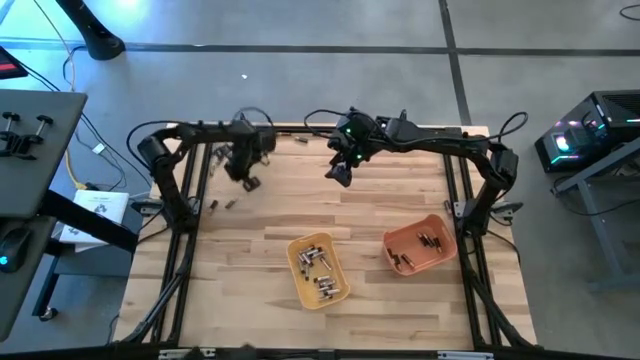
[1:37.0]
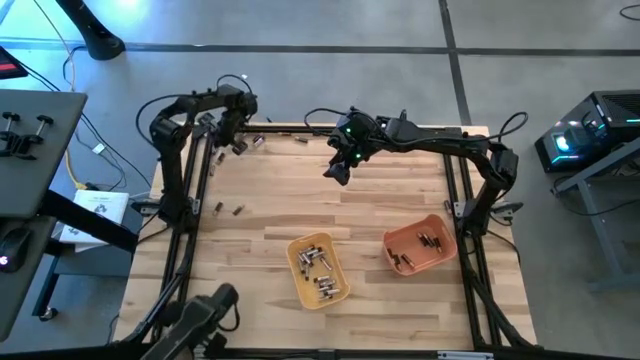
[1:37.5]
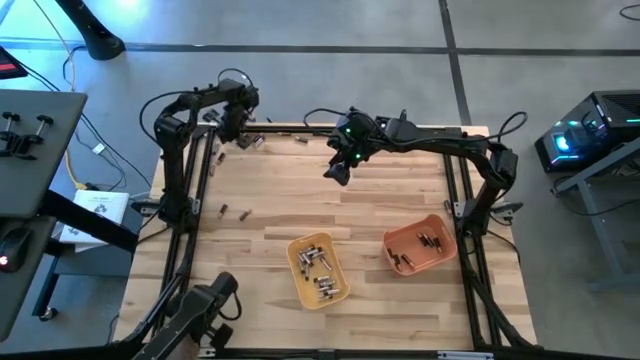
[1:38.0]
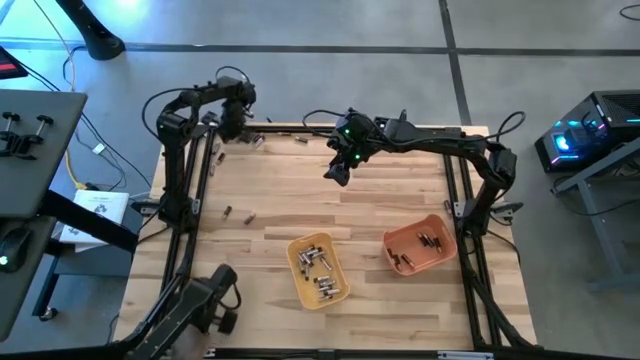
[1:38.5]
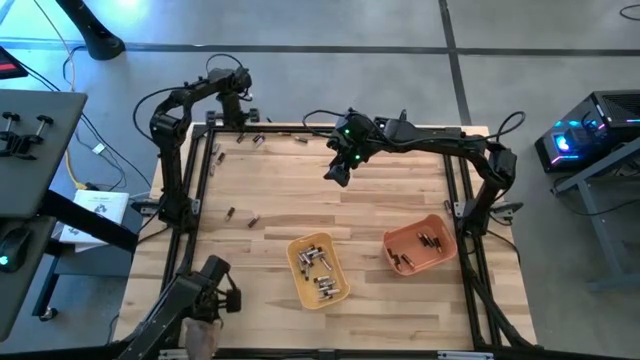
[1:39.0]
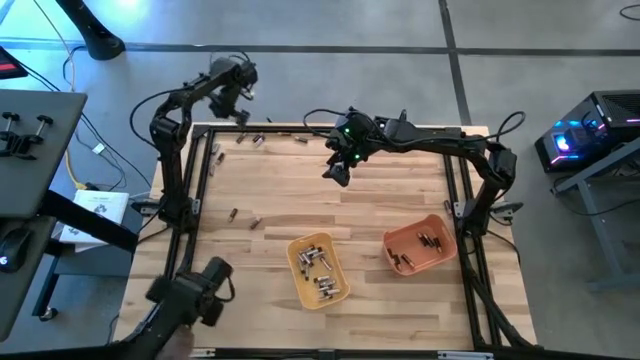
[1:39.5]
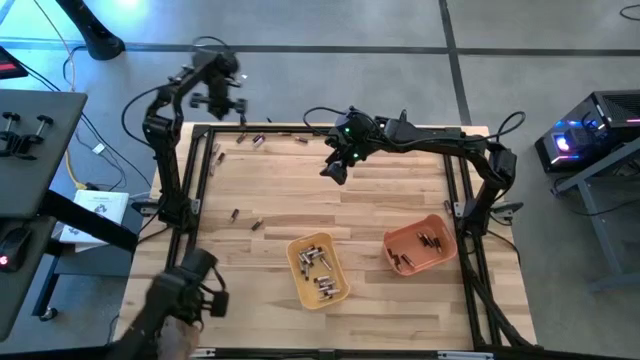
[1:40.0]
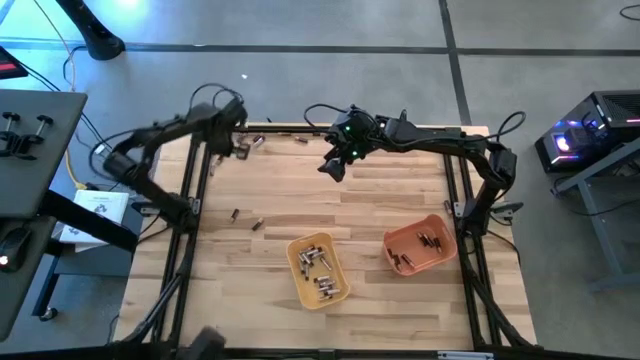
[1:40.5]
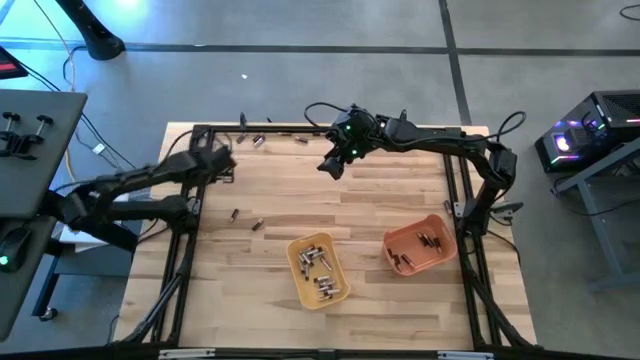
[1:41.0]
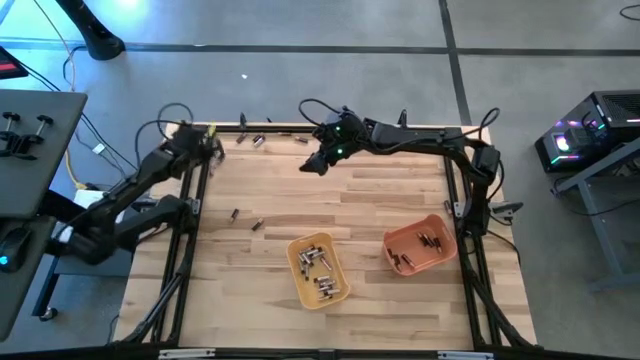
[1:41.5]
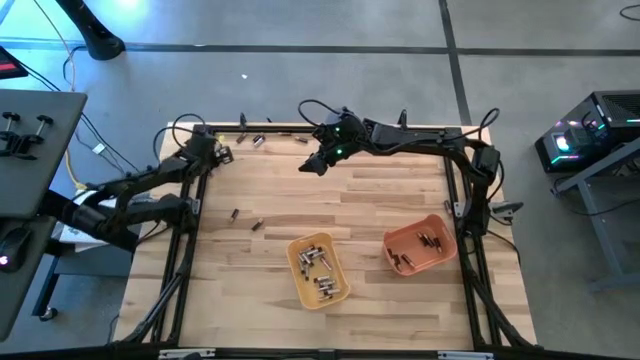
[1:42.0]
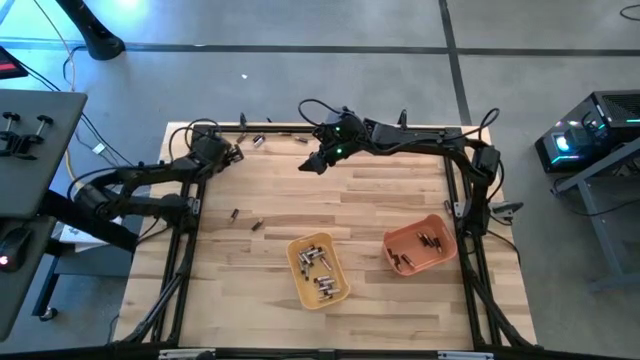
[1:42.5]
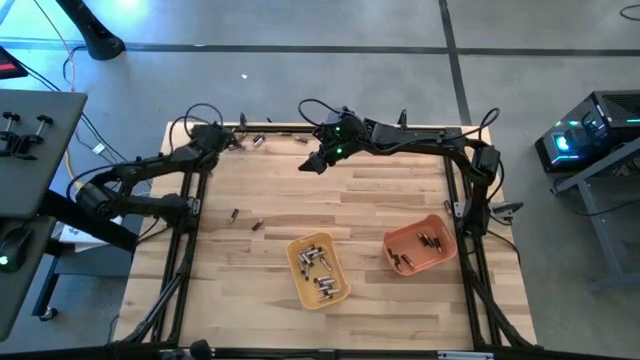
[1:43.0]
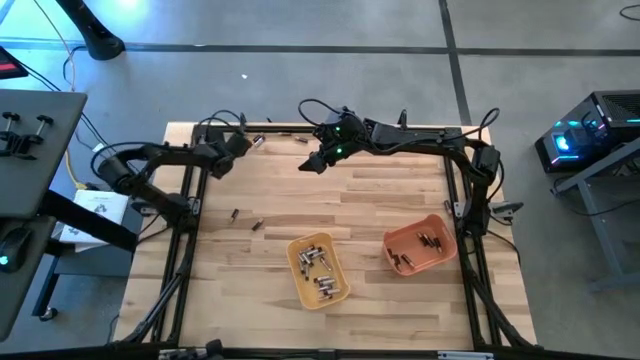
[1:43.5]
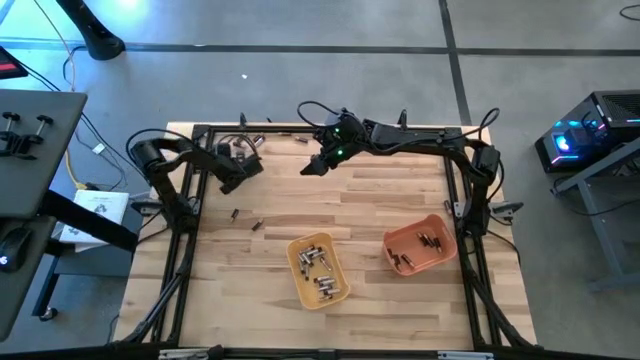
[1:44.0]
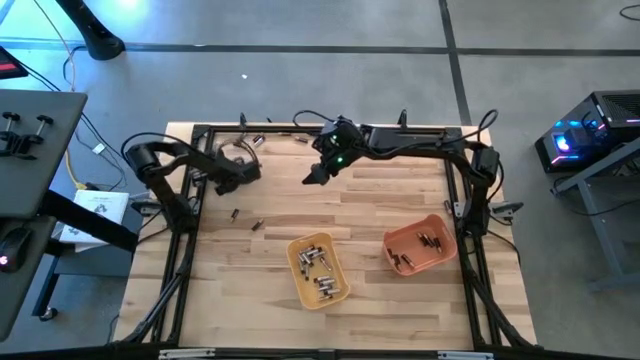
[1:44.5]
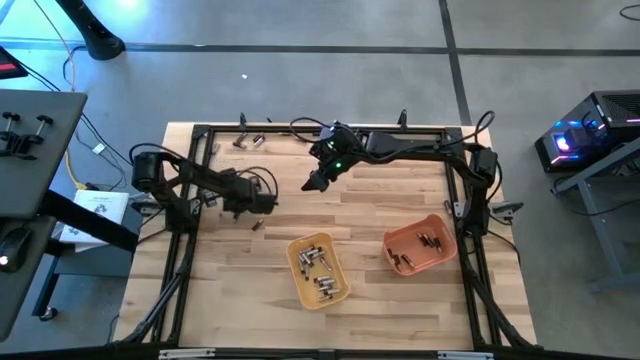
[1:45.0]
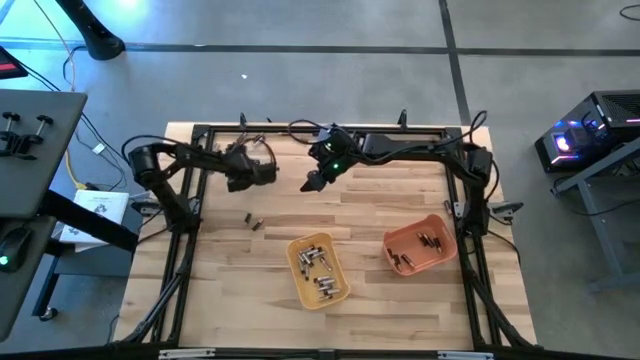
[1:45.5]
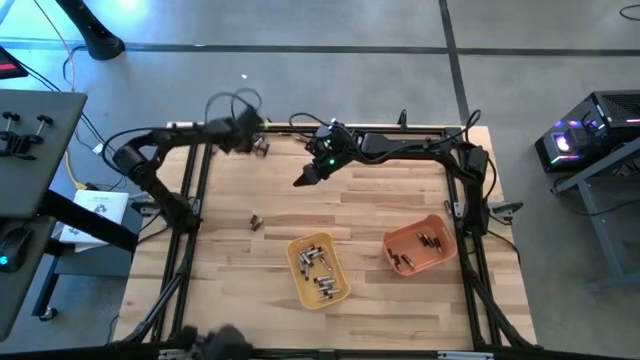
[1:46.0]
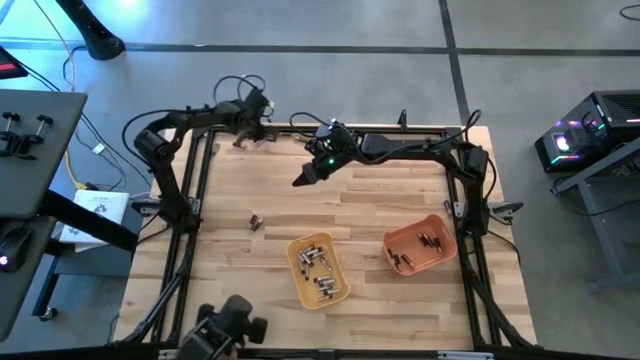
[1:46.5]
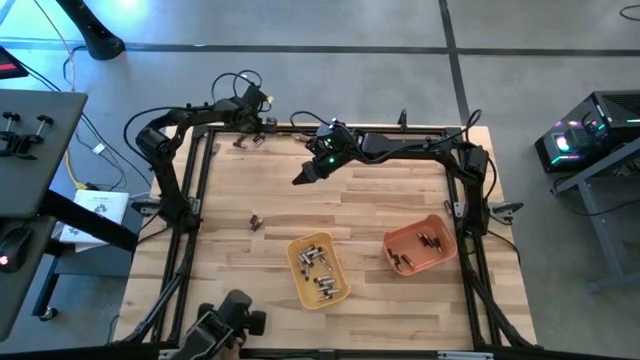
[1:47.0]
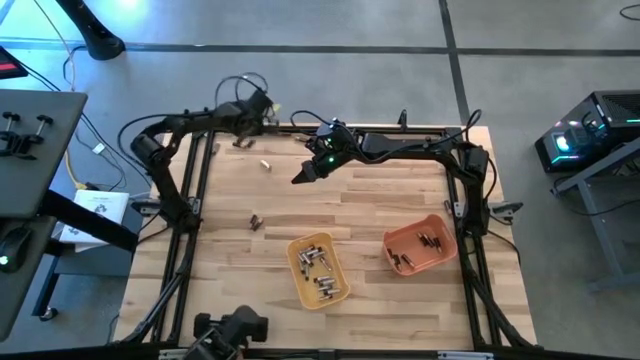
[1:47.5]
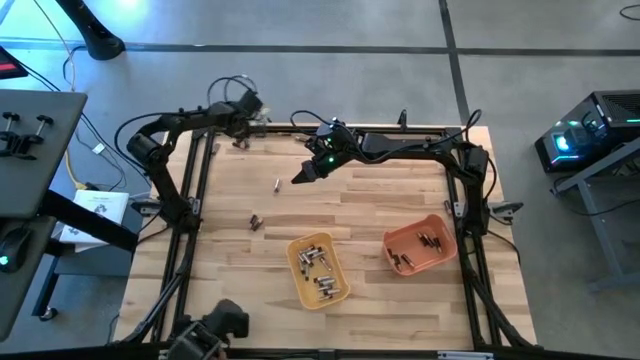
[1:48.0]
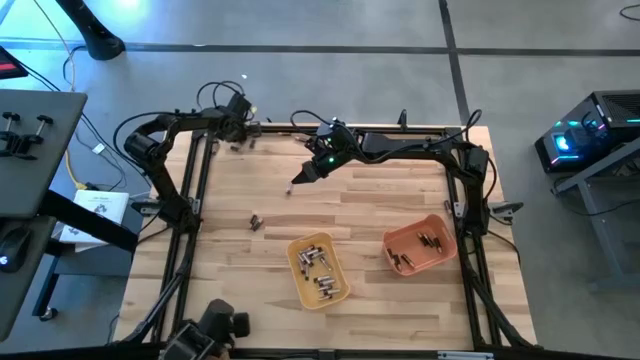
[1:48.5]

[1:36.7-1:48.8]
Task: Sort batteries
Adjust the black batteries

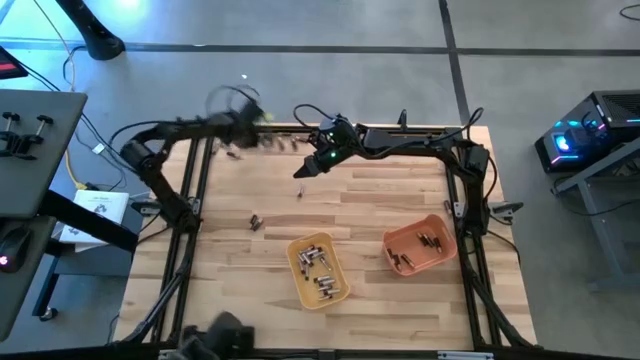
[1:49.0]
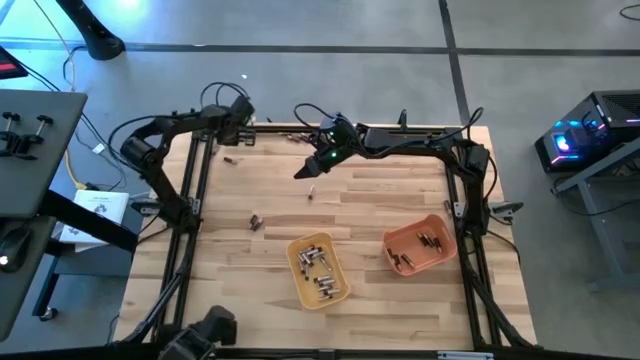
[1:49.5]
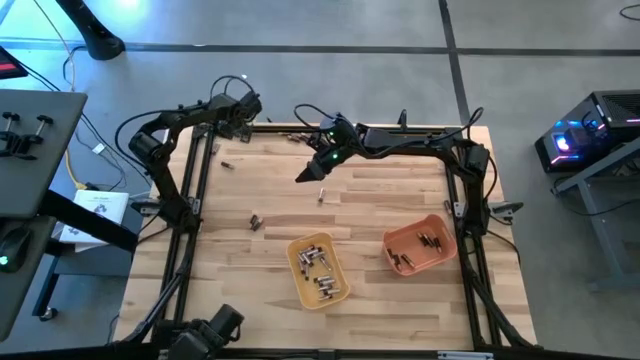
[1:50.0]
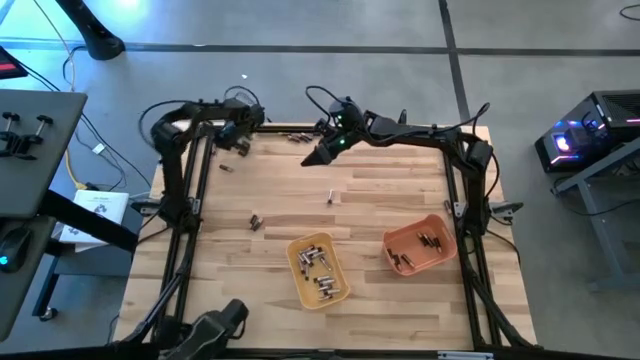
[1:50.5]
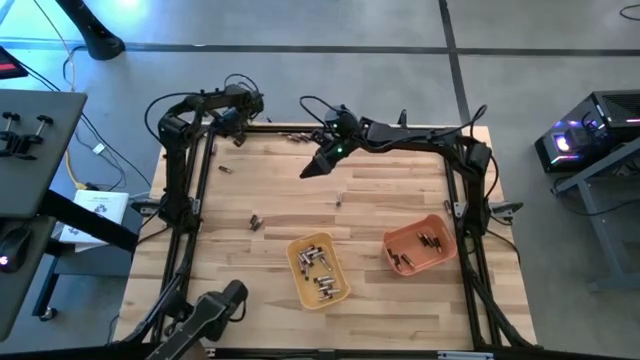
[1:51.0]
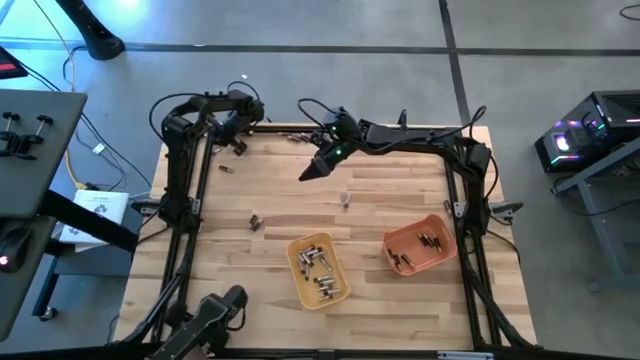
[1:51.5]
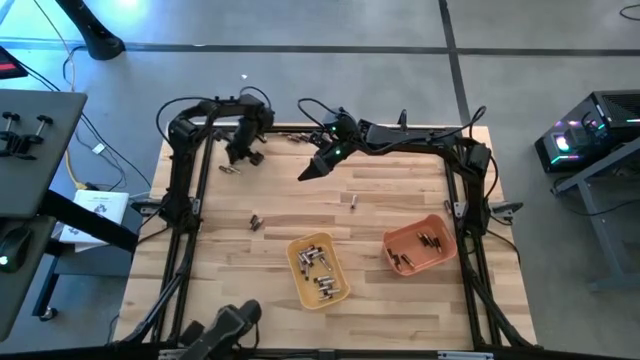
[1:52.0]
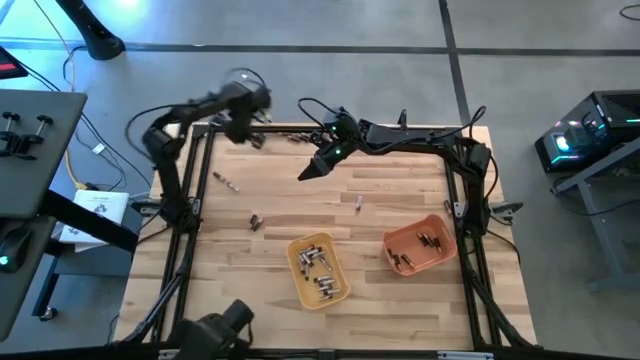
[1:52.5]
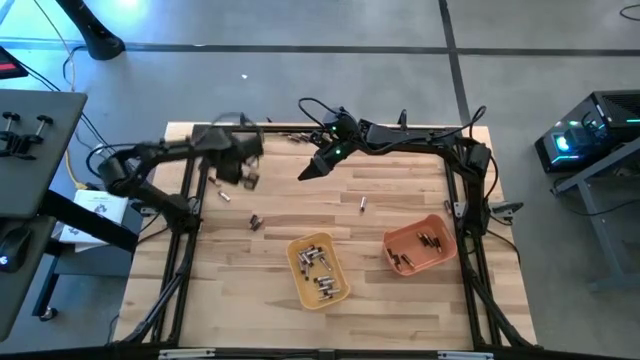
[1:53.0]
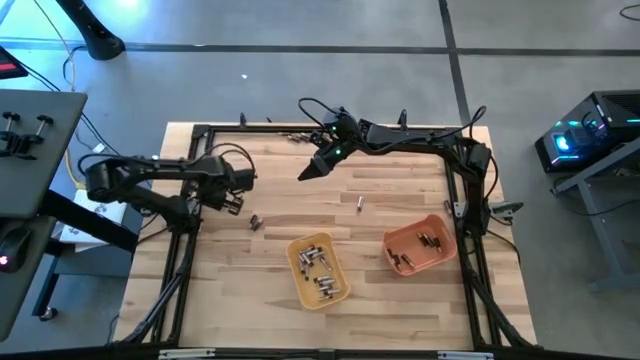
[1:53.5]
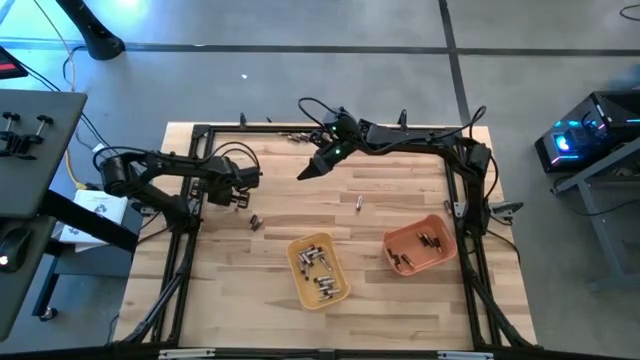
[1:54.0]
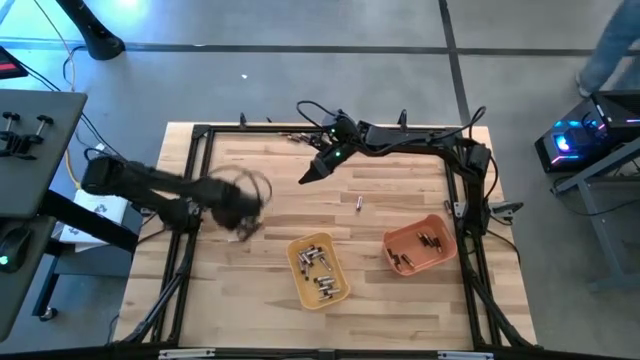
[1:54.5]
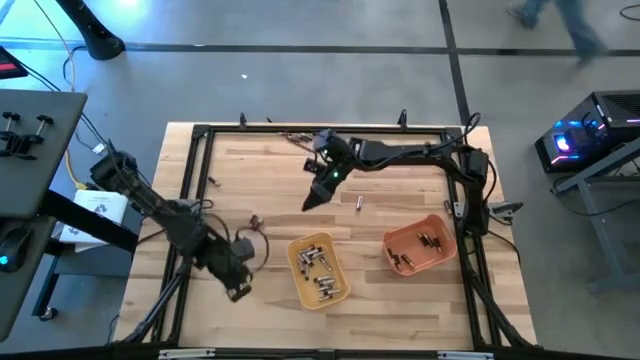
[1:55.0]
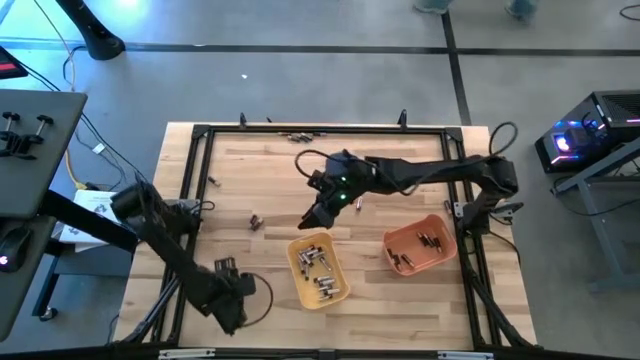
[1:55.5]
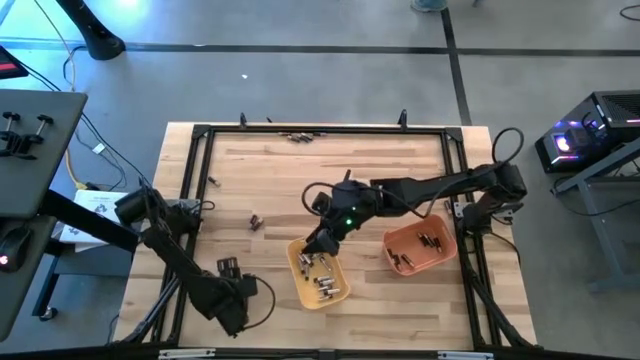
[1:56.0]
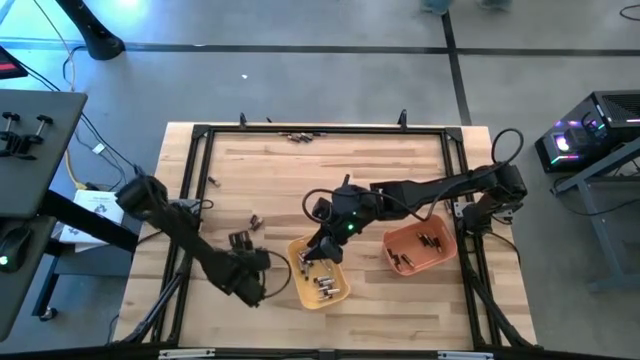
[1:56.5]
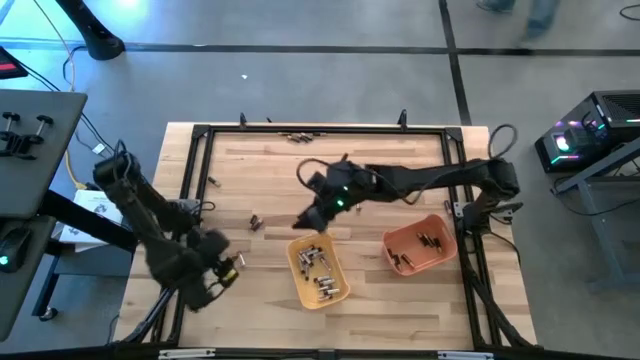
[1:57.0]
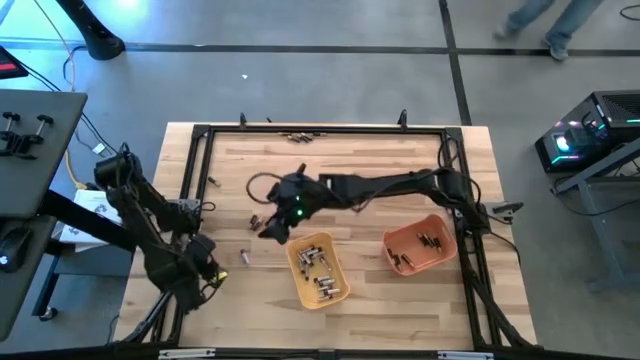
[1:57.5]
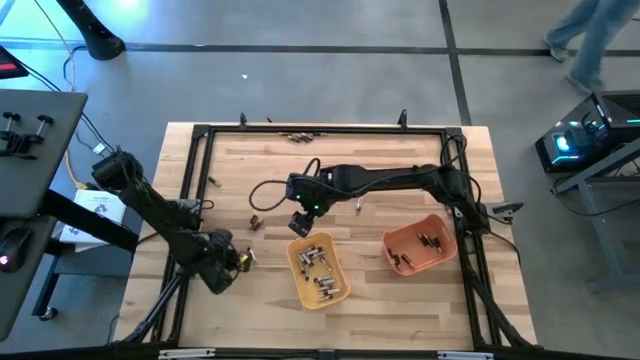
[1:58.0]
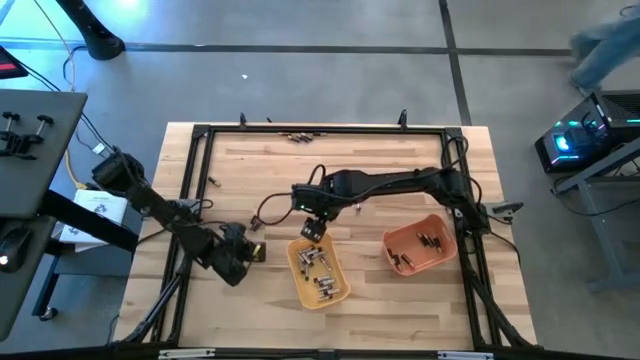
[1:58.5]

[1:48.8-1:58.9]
Adjust the silver battery
